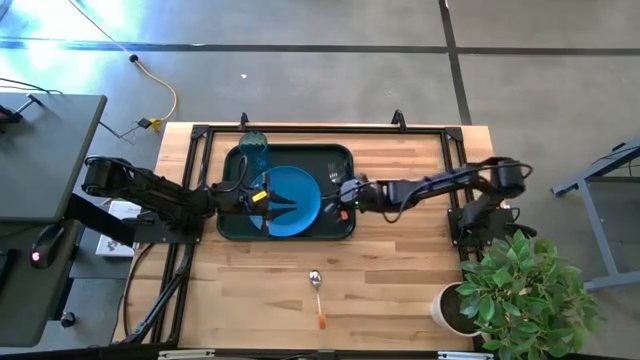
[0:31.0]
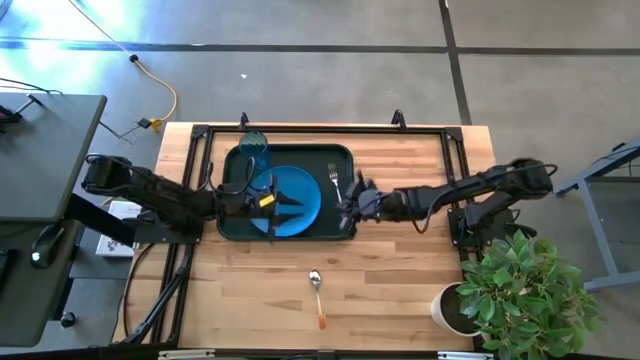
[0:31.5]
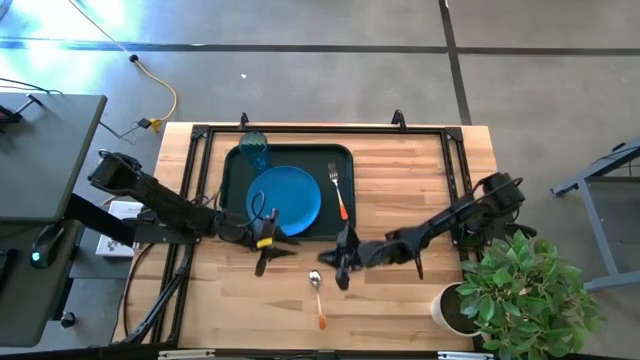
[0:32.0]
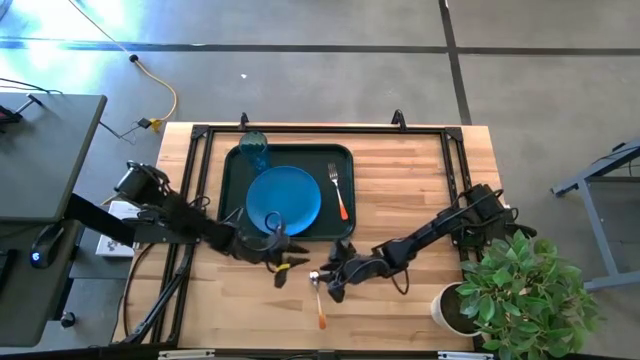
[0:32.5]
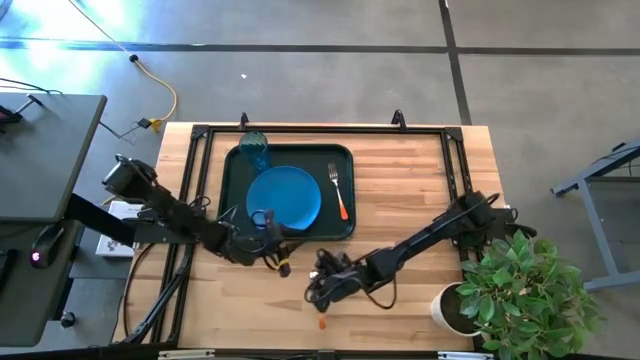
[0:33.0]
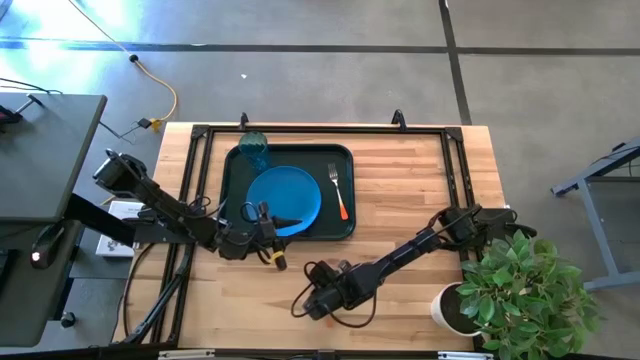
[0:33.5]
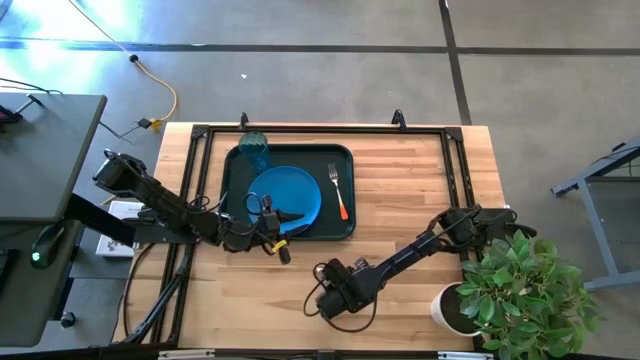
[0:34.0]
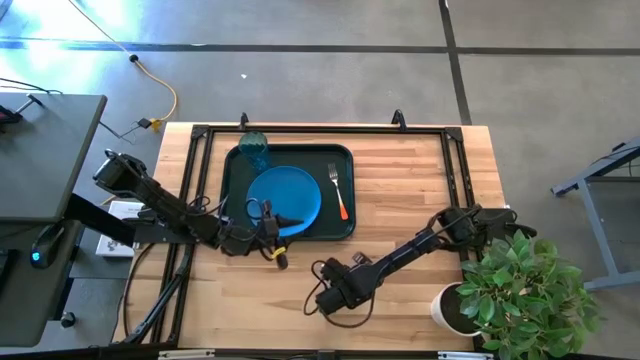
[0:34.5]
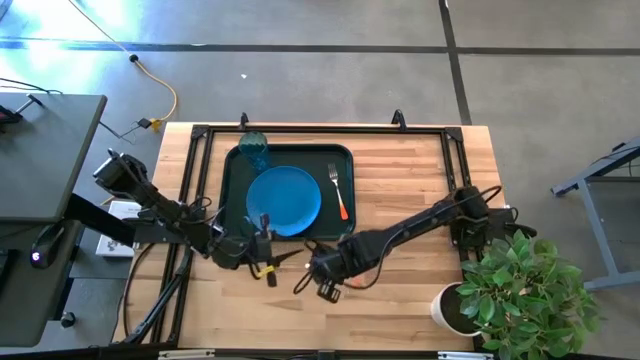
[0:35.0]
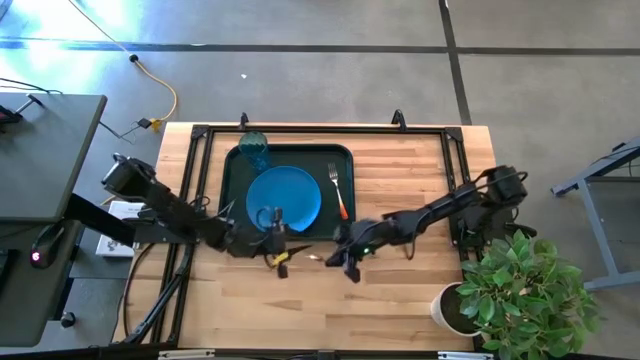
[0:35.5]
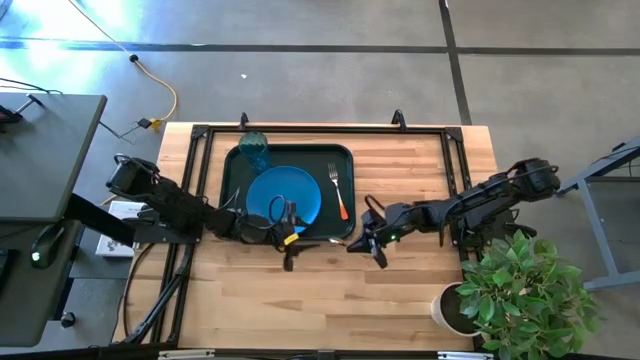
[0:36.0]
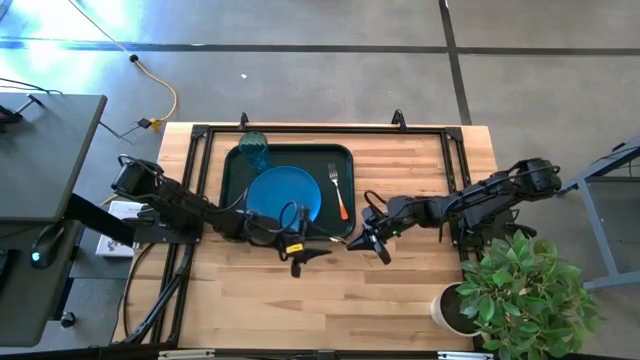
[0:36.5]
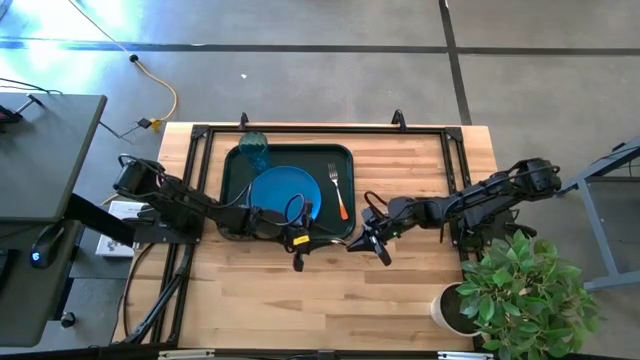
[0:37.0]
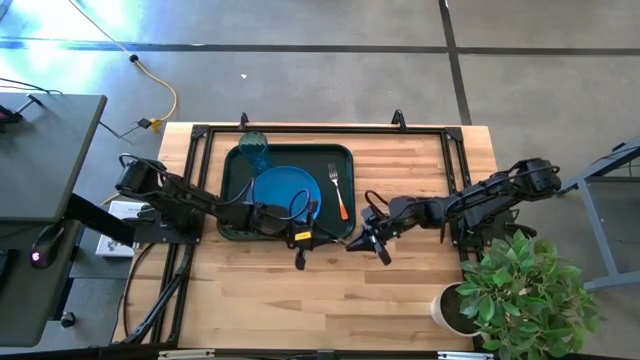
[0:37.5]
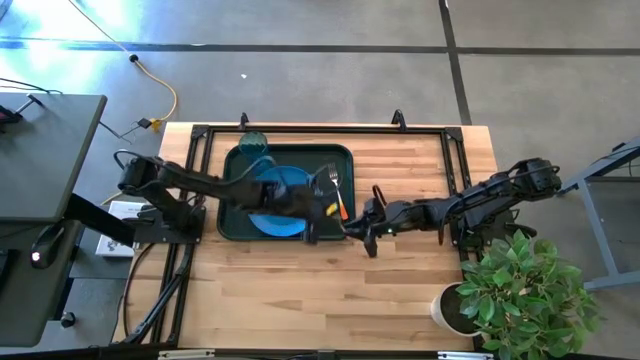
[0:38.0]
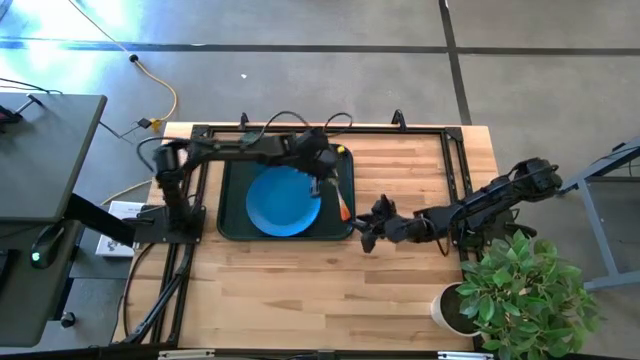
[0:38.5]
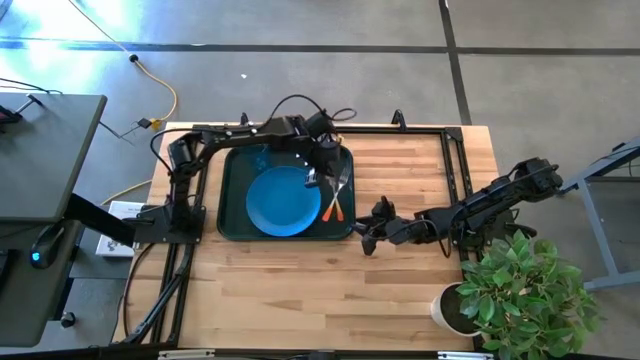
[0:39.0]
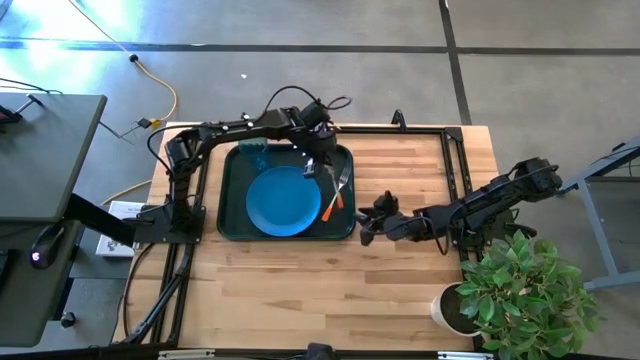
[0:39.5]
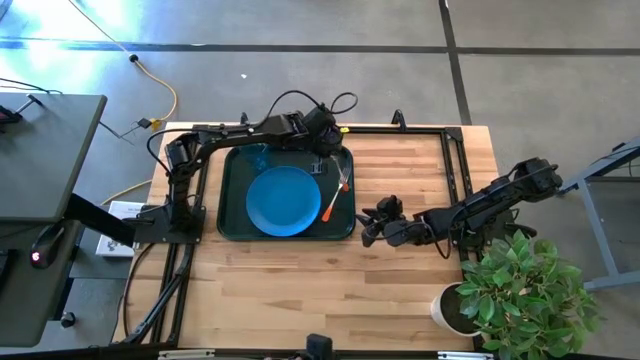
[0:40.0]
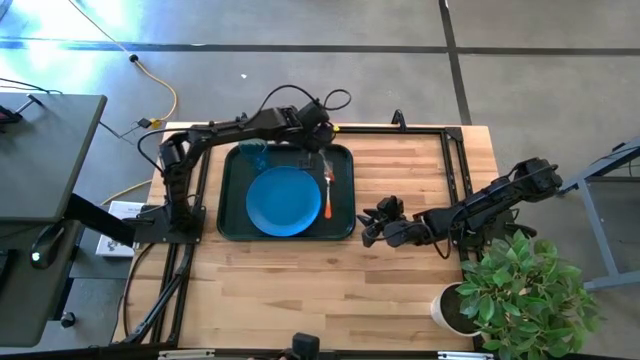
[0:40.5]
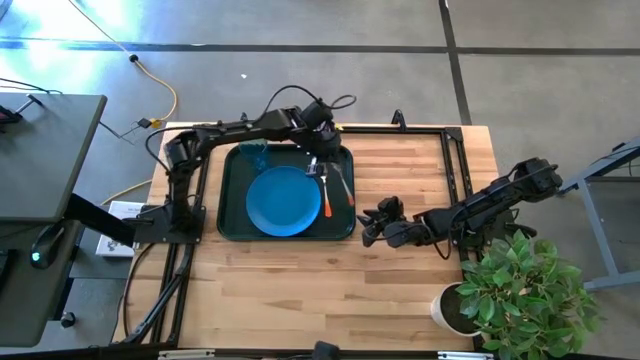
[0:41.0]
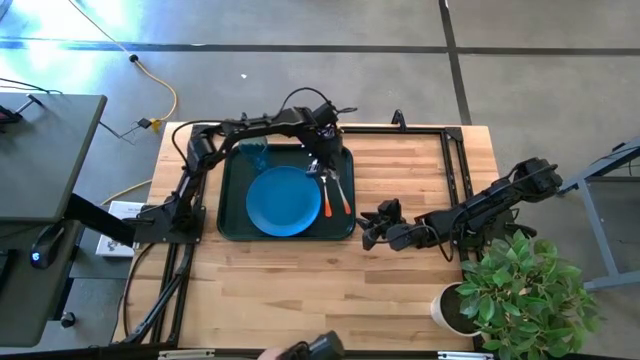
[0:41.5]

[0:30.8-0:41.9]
Task: Pick and place plate/cup/fork/spoon on tray
Put the orange spoon on the black tray to the right of the orange fork

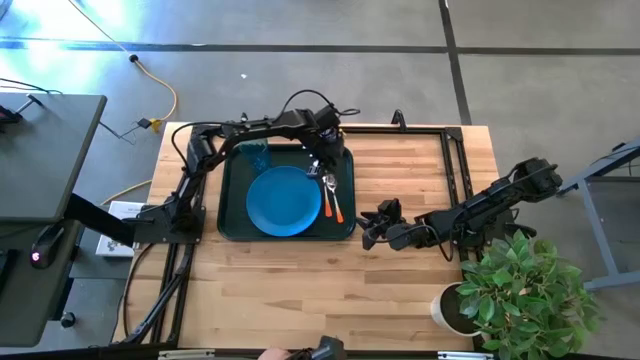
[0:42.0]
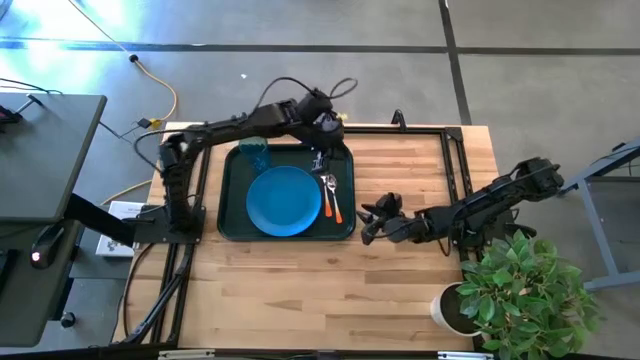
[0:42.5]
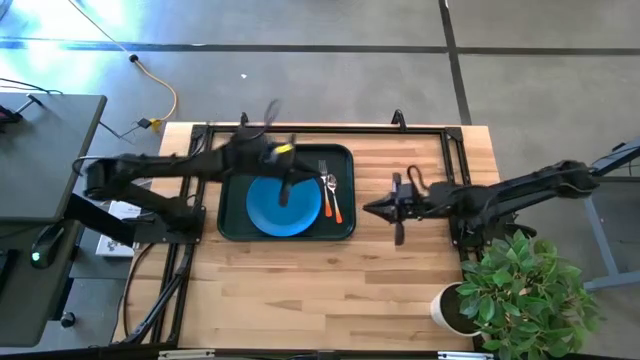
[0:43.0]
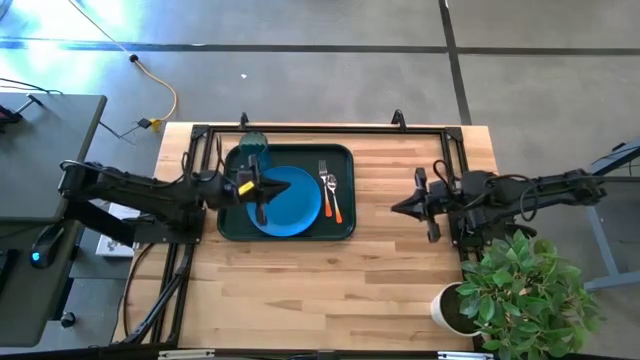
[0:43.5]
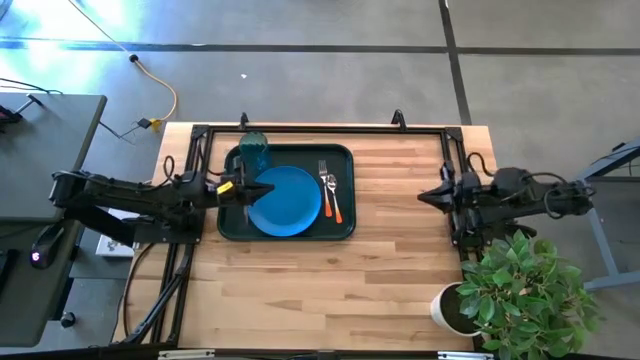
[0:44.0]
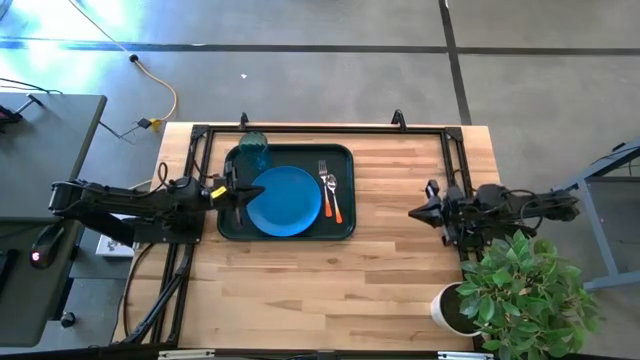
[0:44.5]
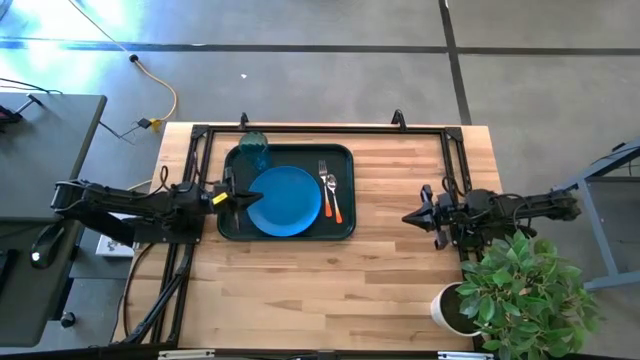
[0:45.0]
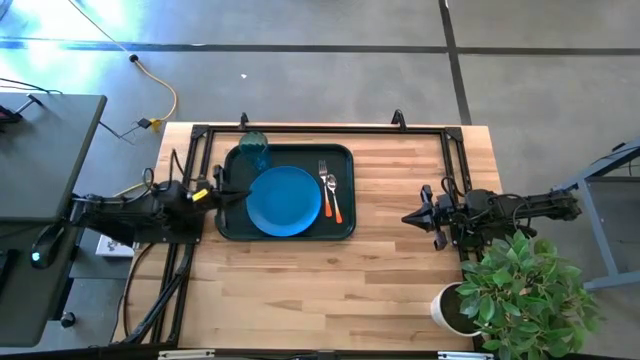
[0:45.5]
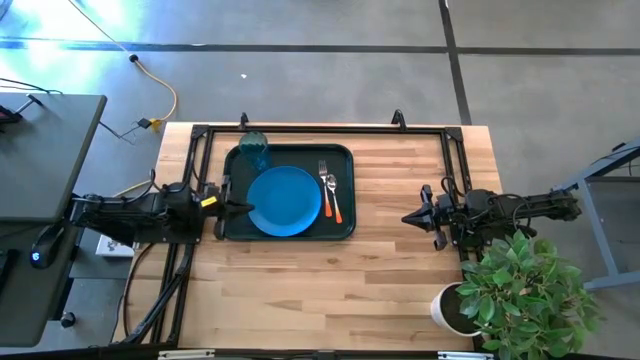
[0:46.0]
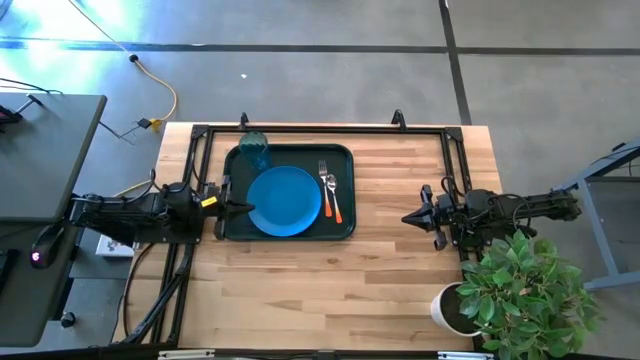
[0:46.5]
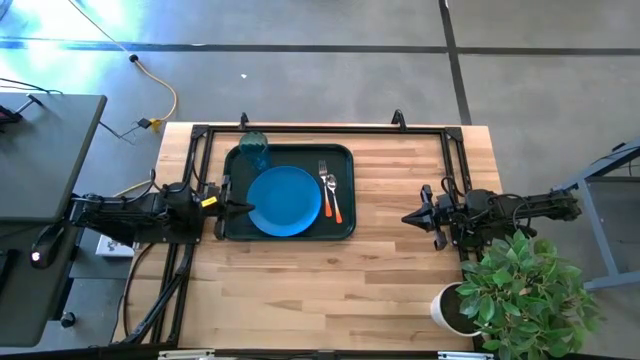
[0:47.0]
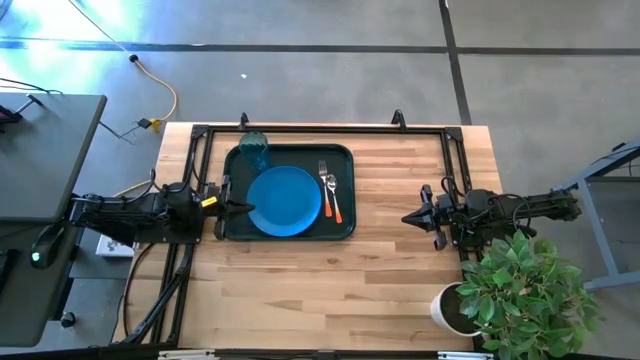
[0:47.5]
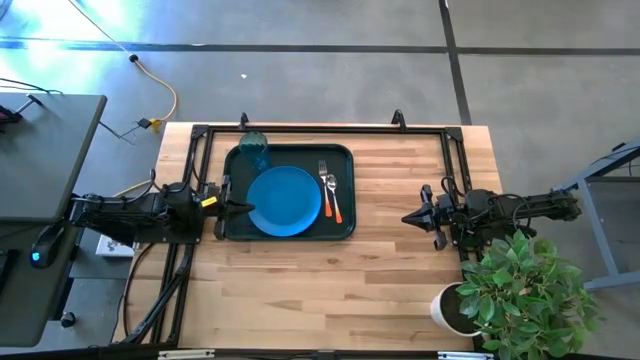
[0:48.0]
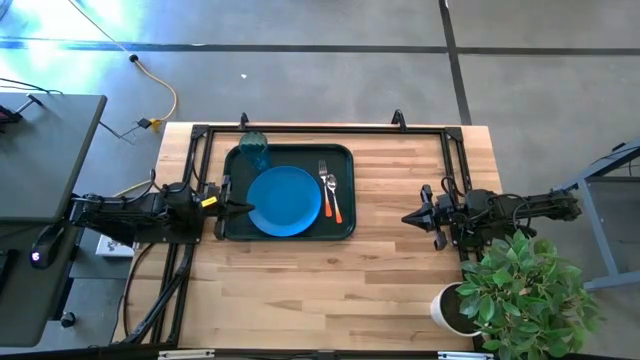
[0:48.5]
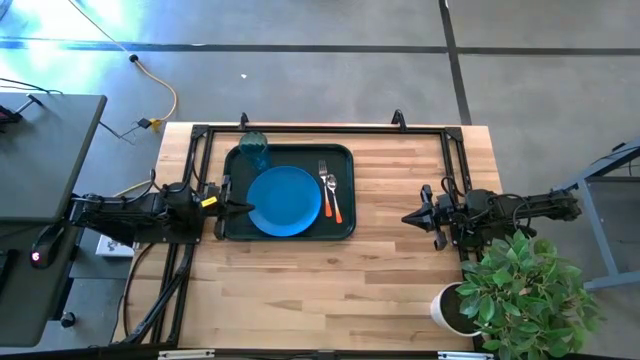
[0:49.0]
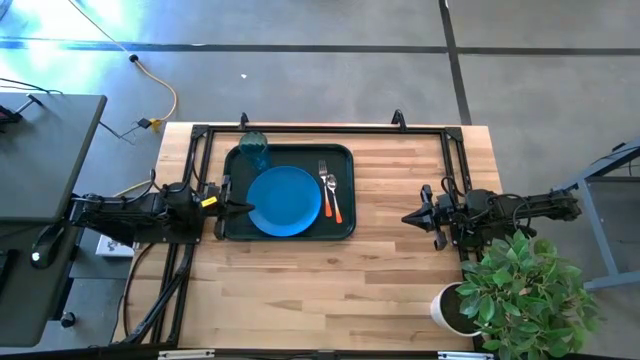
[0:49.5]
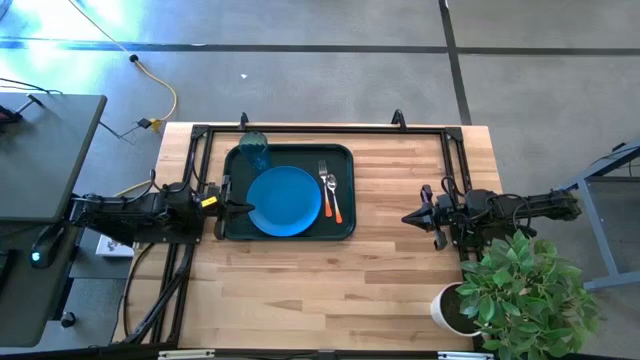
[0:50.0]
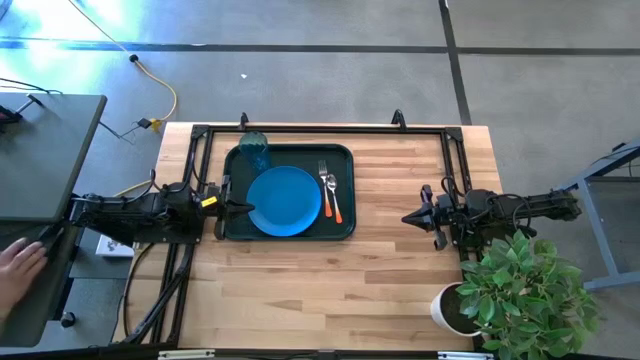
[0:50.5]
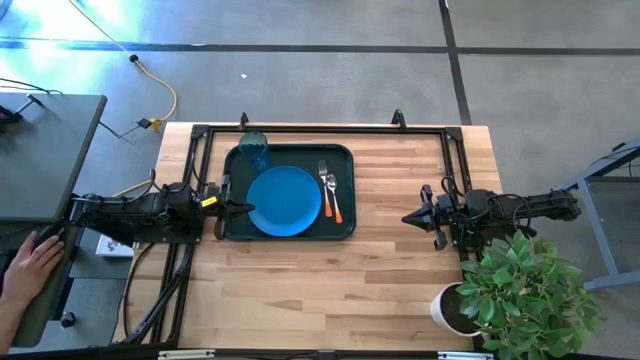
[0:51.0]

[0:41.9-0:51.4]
Return to Home Position
